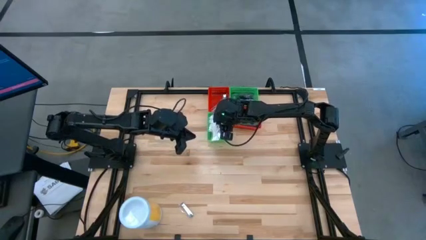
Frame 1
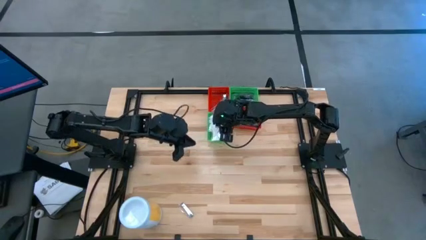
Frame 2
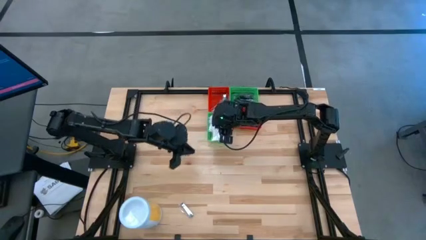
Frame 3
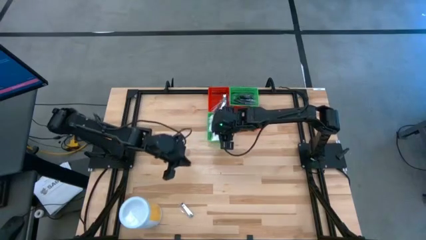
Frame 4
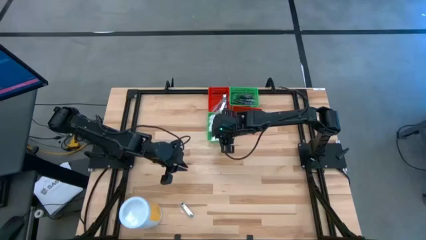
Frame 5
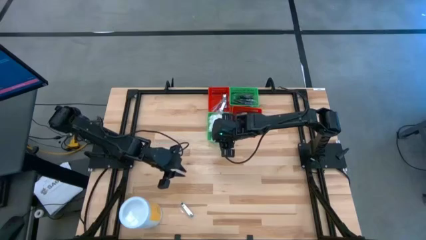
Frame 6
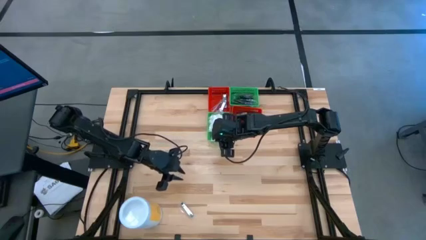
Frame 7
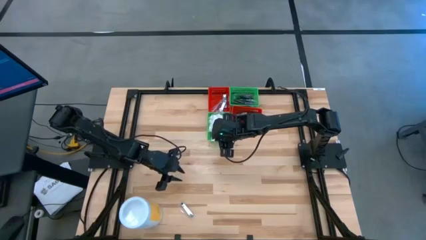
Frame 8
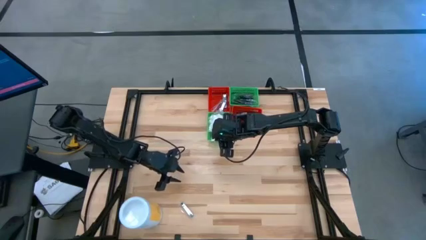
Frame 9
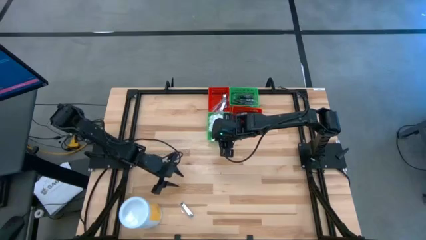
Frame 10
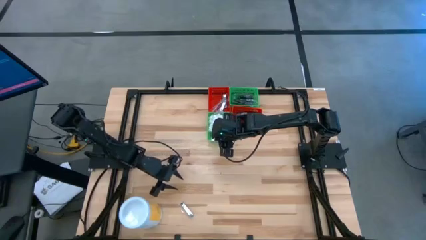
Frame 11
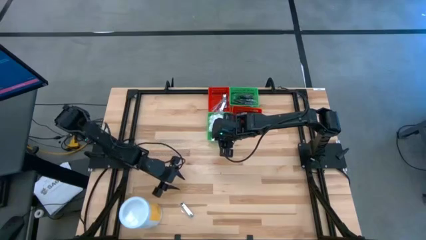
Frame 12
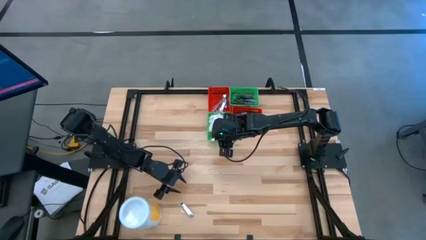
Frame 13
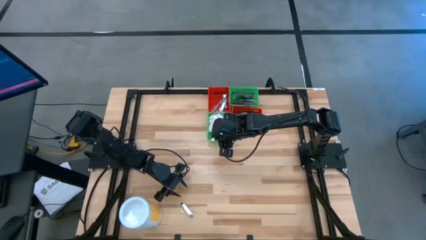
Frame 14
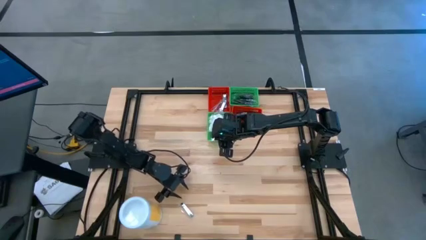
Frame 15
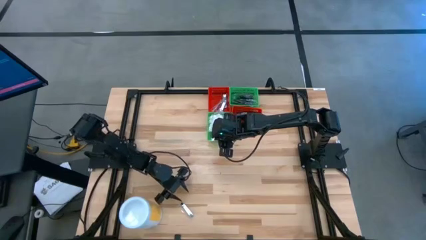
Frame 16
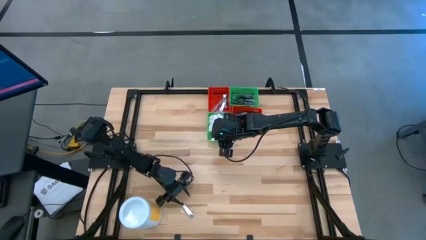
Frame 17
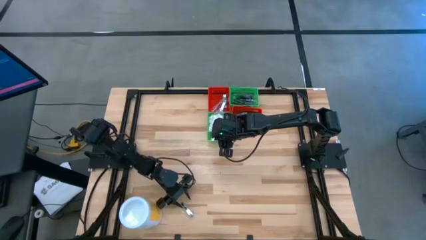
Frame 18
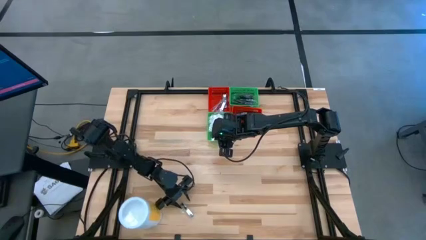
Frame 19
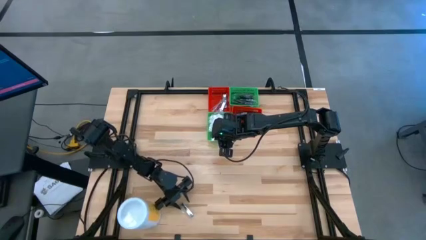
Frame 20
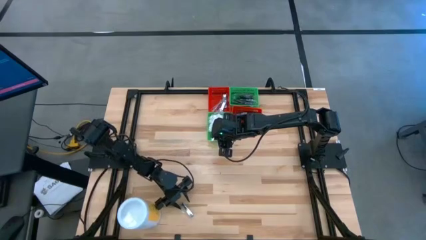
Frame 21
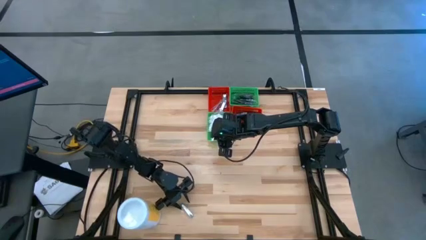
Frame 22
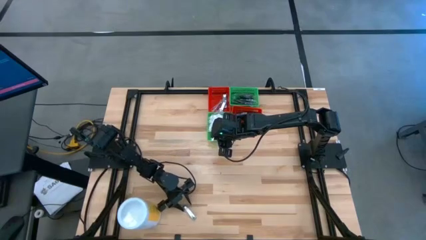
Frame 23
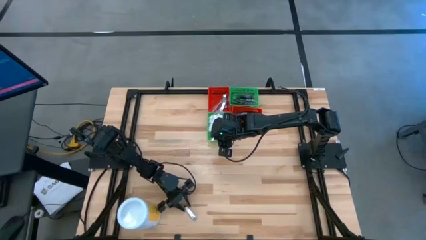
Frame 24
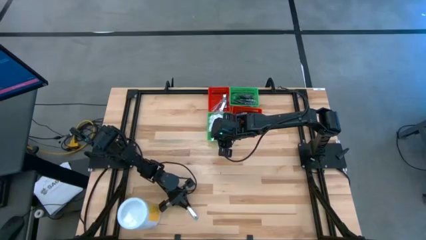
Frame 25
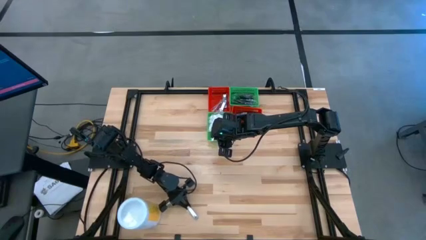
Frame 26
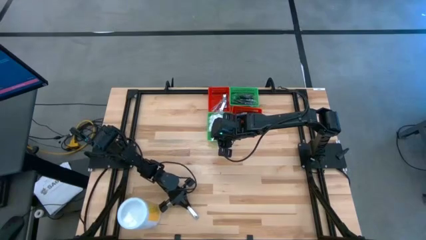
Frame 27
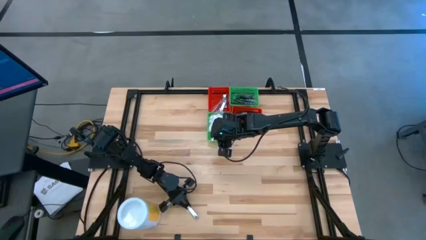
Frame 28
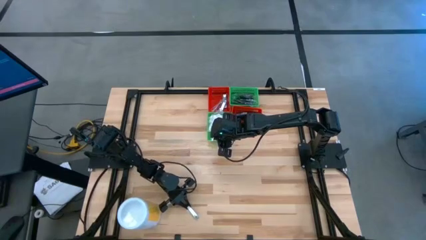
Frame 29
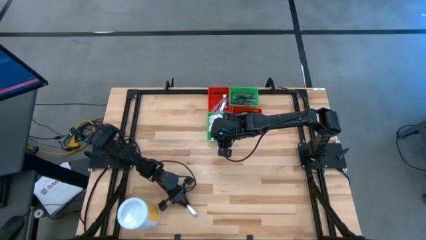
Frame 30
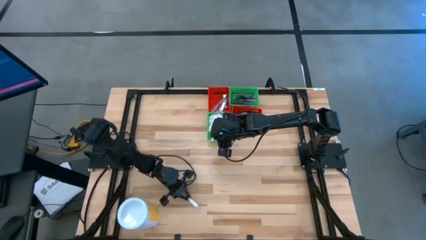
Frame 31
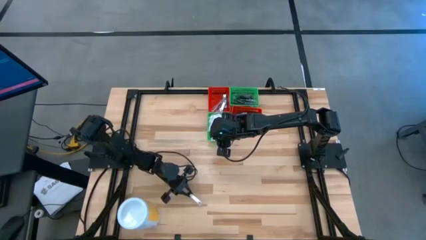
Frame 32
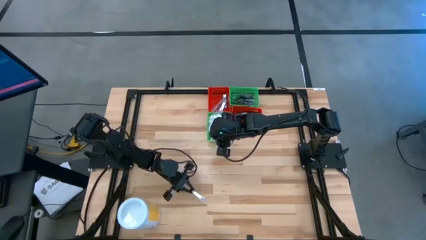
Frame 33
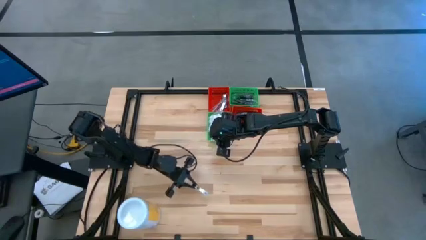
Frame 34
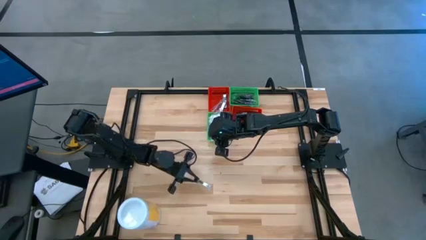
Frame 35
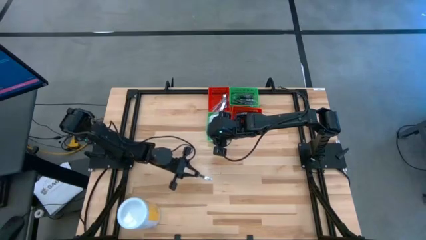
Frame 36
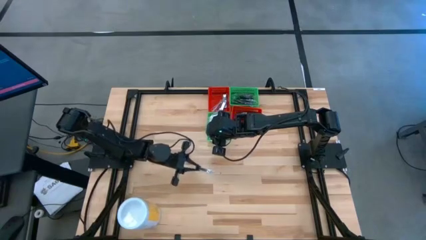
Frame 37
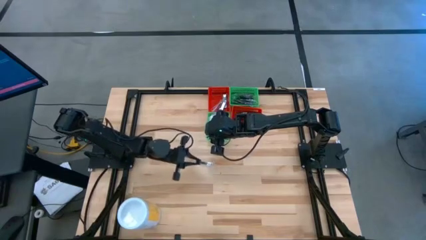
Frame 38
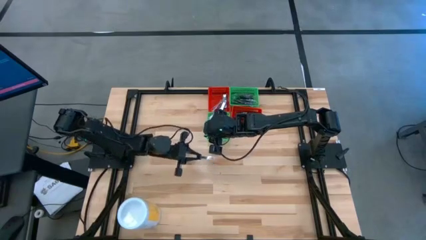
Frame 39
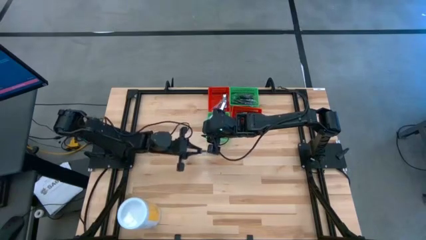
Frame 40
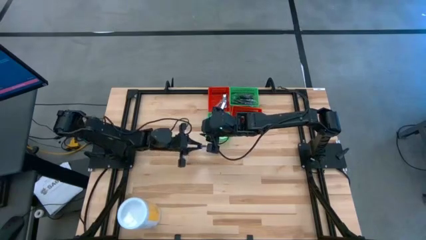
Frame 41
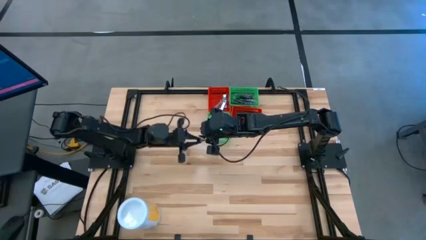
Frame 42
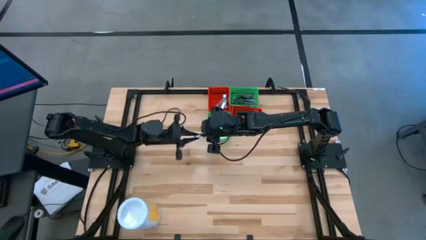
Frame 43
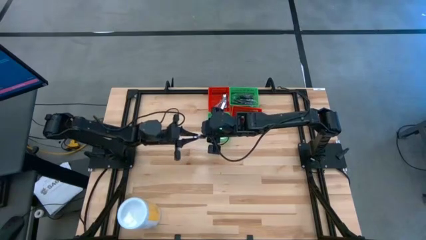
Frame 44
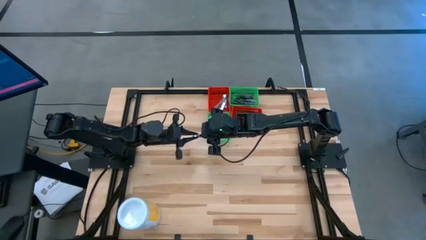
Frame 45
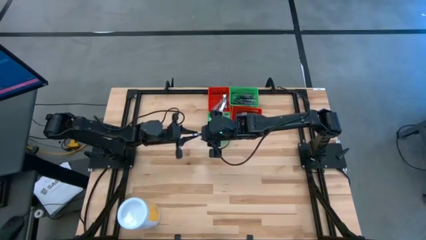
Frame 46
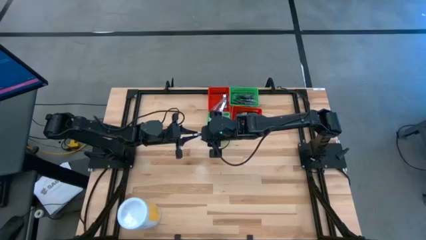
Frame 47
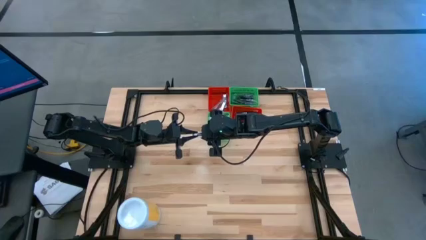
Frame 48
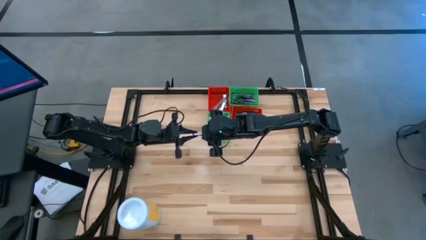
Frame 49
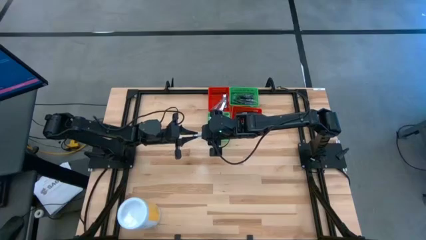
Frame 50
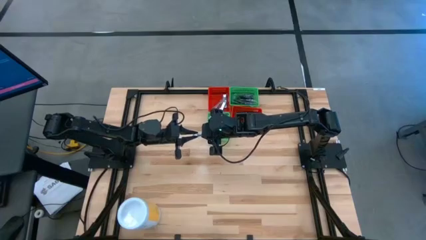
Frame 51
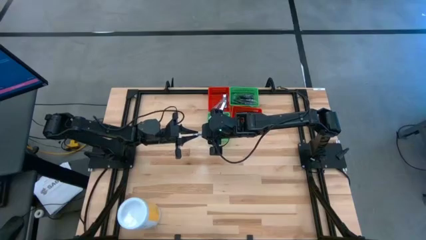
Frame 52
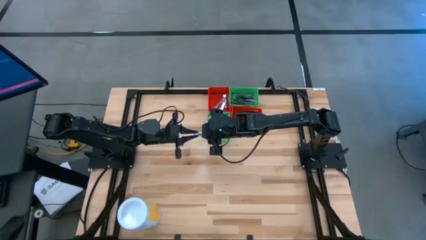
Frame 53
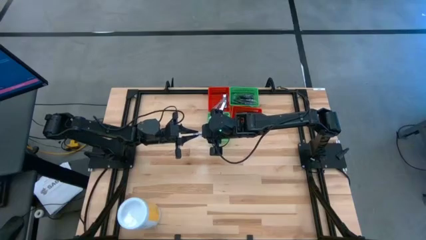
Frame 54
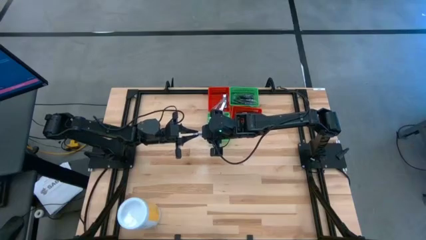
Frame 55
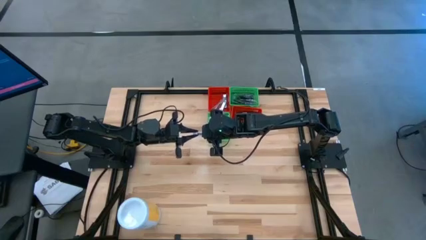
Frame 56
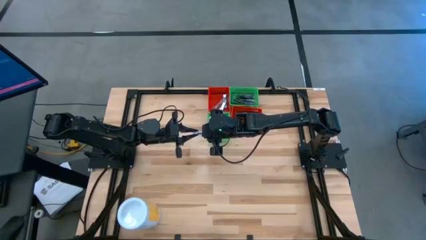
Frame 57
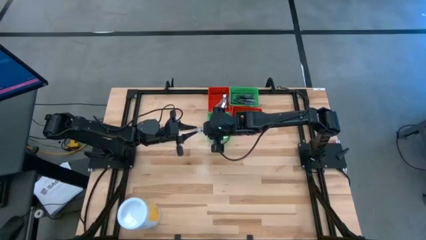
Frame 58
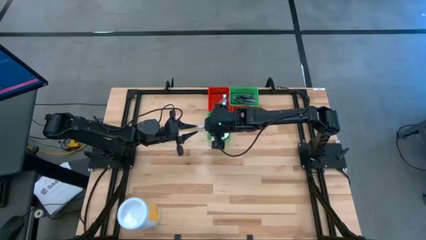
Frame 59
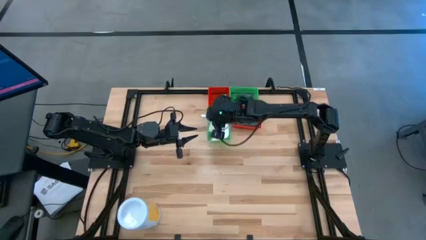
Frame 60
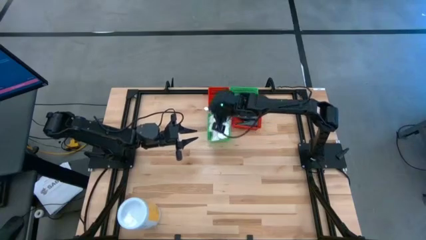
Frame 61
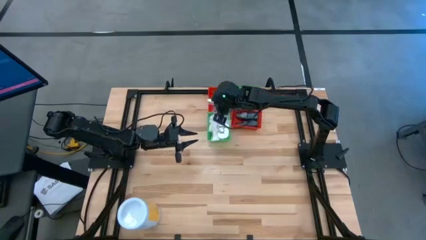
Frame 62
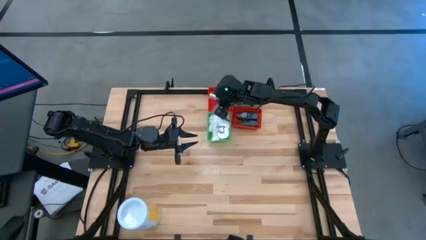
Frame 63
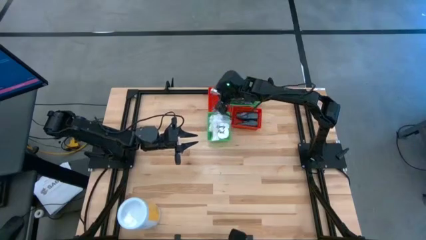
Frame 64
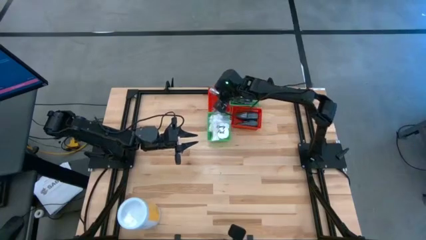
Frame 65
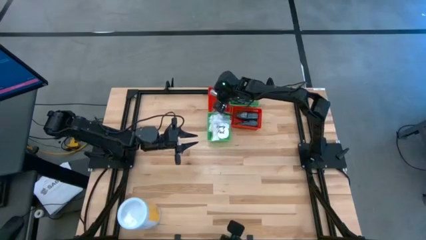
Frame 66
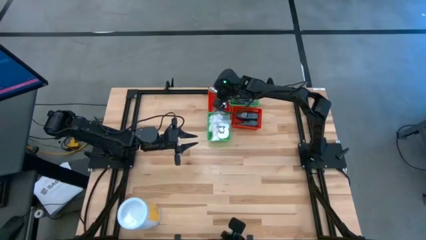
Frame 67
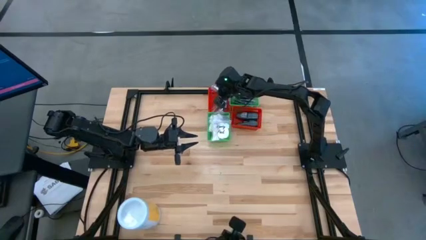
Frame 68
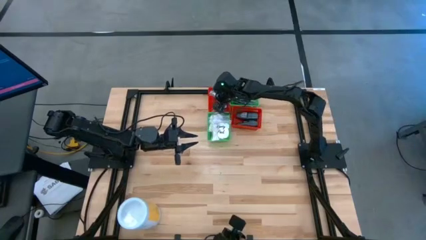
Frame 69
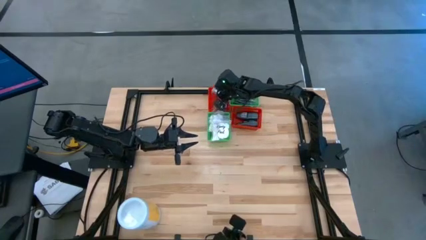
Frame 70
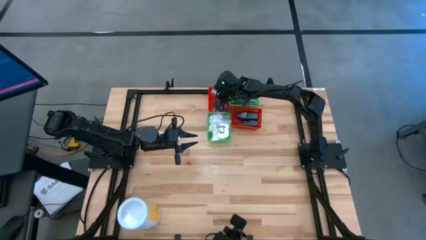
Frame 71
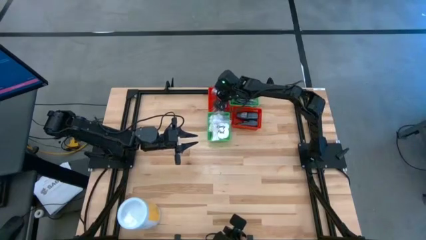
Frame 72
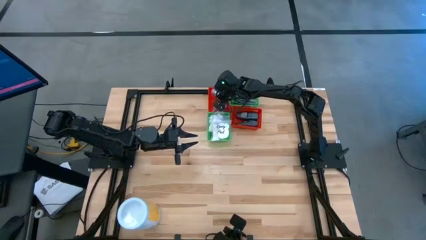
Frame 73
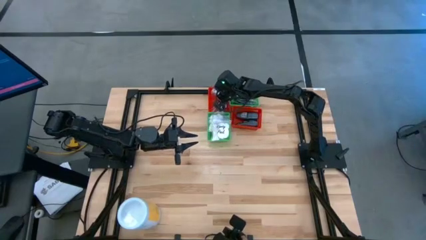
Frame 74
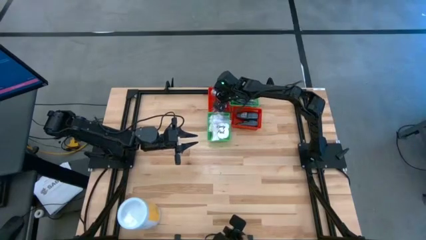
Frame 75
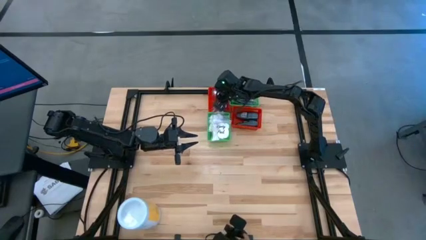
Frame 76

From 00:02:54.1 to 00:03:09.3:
Task: Pick & Place Travel size toiletries
Put the nail cutter into the left red bin

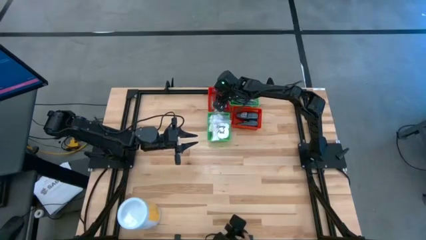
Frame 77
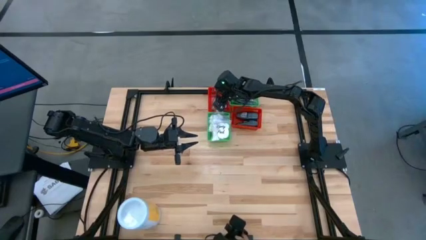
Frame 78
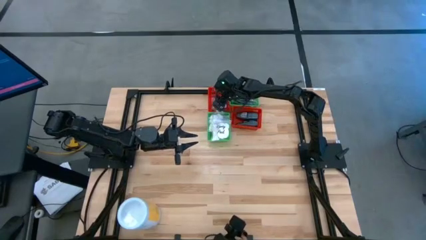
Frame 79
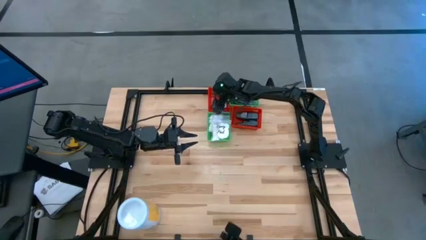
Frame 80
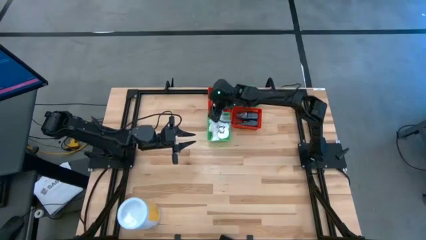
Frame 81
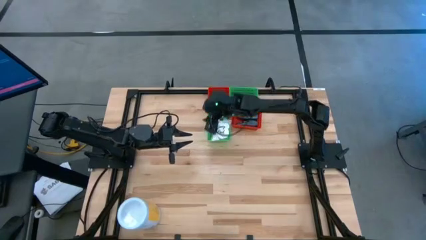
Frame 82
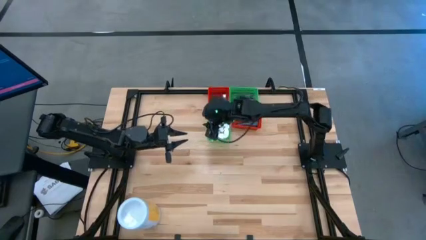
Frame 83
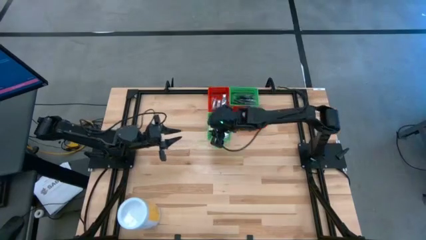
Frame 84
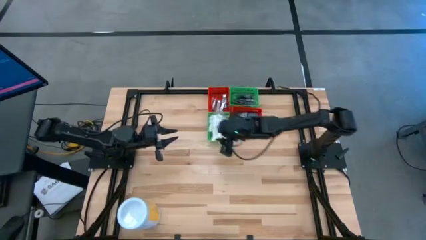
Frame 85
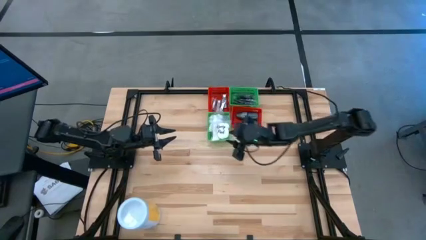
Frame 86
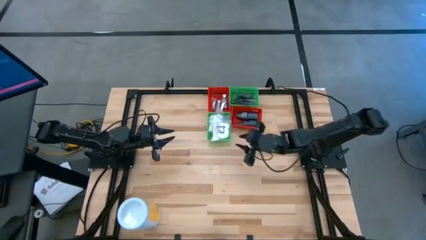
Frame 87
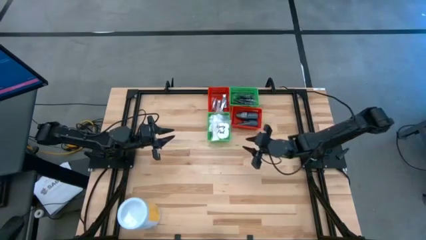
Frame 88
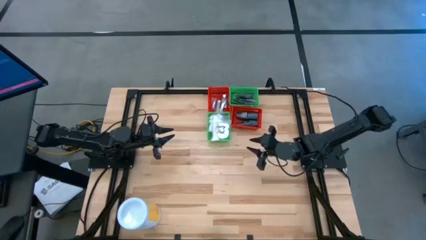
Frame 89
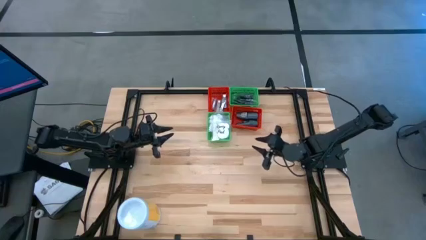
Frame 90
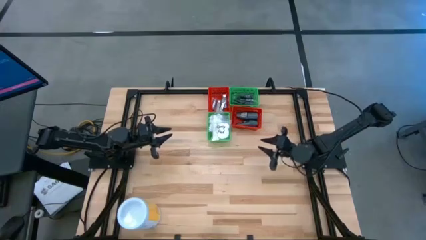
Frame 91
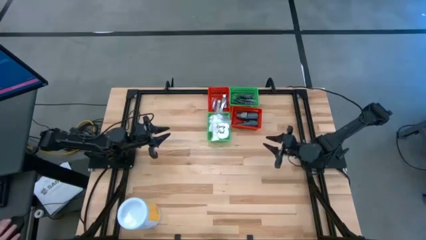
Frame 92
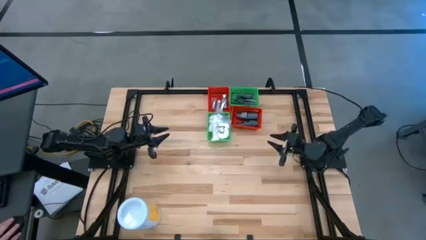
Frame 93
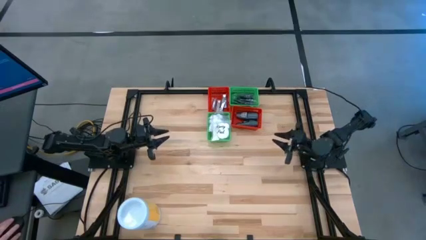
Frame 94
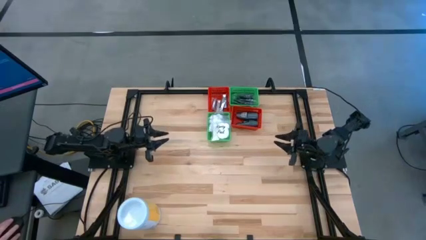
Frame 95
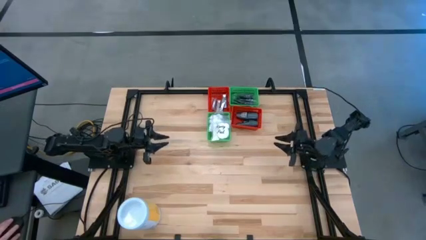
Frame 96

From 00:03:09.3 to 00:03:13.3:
Return to Home Position
